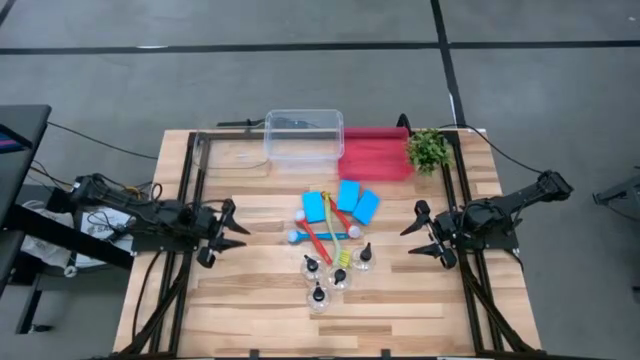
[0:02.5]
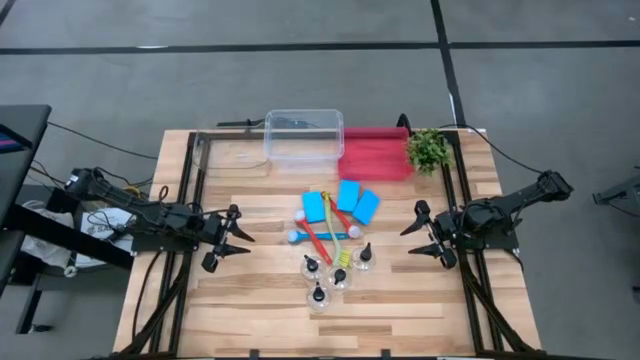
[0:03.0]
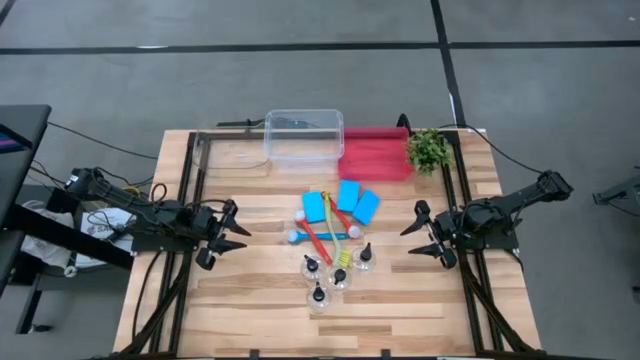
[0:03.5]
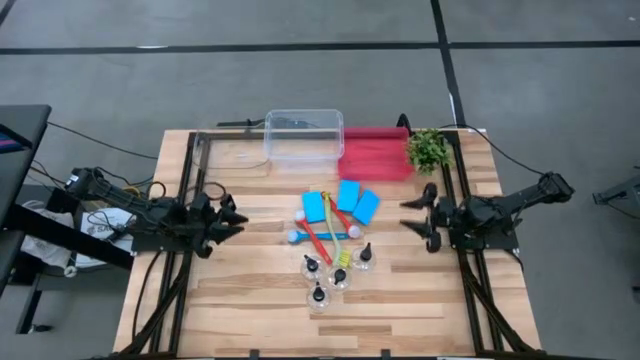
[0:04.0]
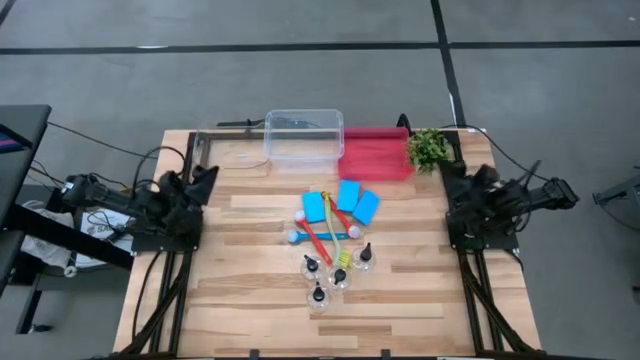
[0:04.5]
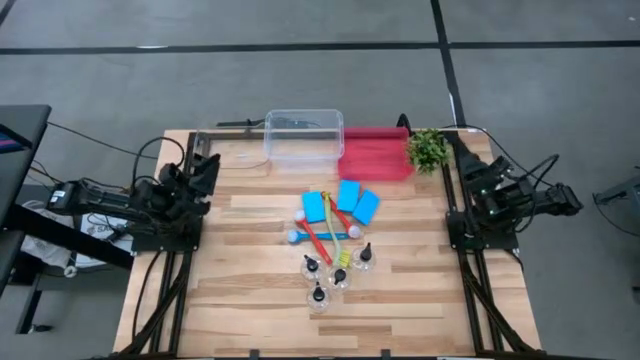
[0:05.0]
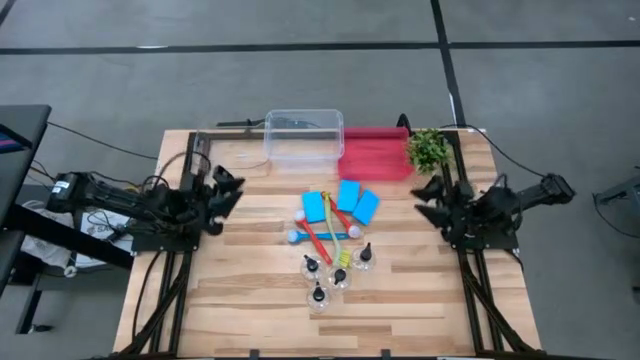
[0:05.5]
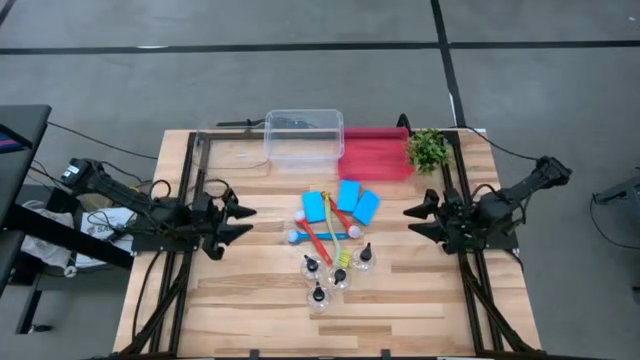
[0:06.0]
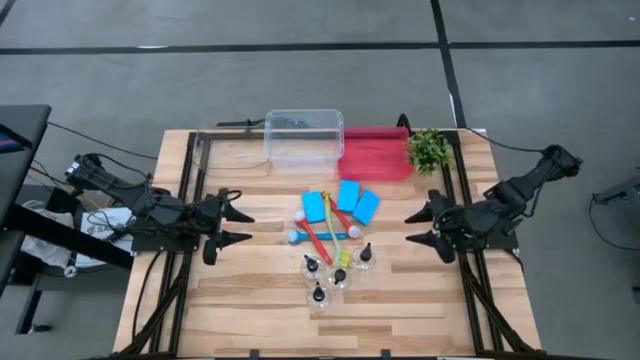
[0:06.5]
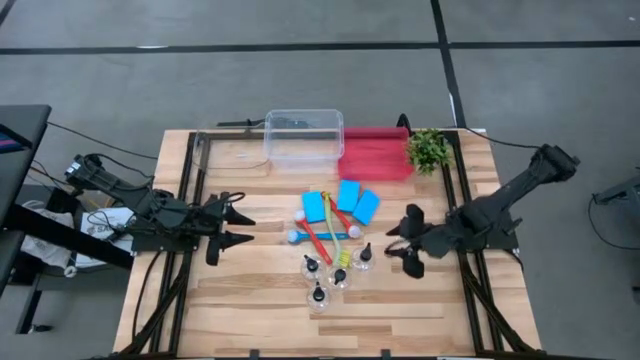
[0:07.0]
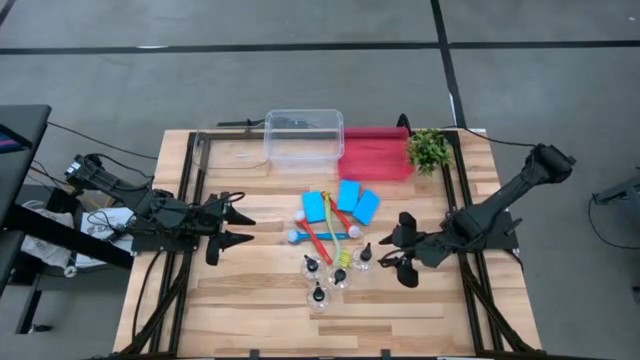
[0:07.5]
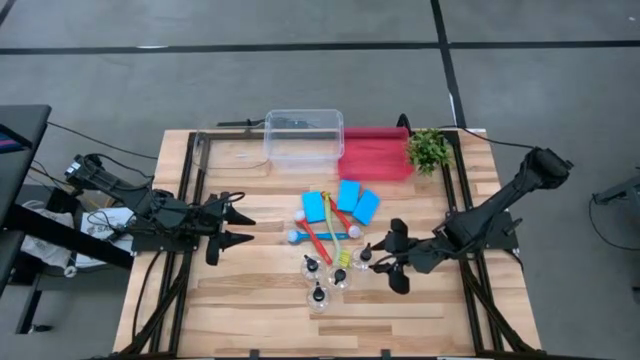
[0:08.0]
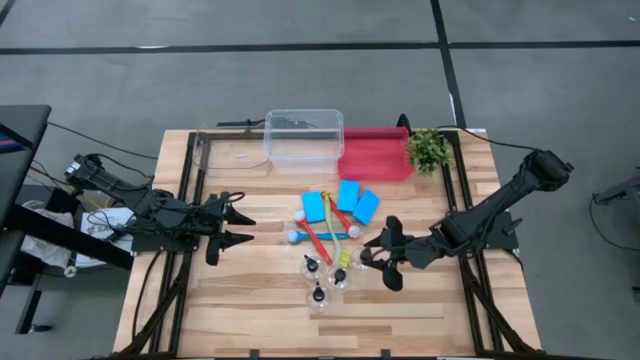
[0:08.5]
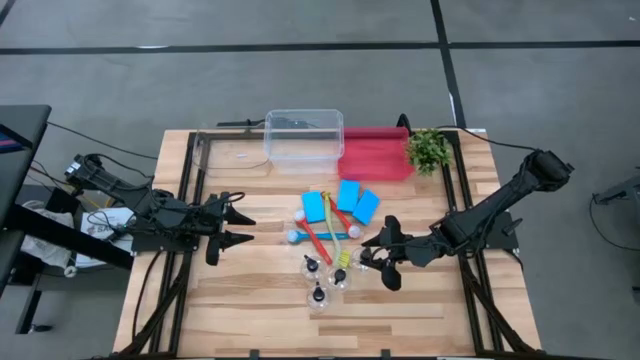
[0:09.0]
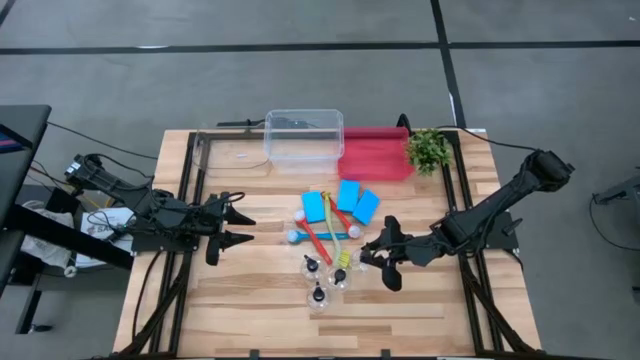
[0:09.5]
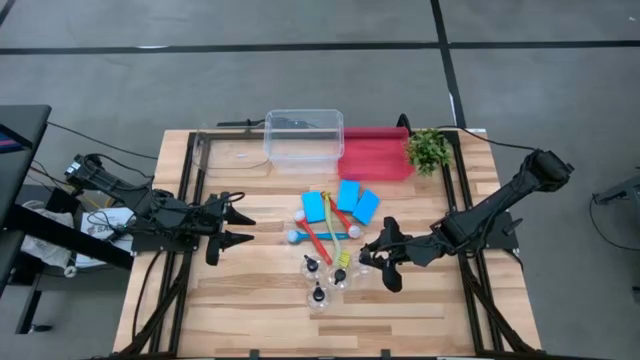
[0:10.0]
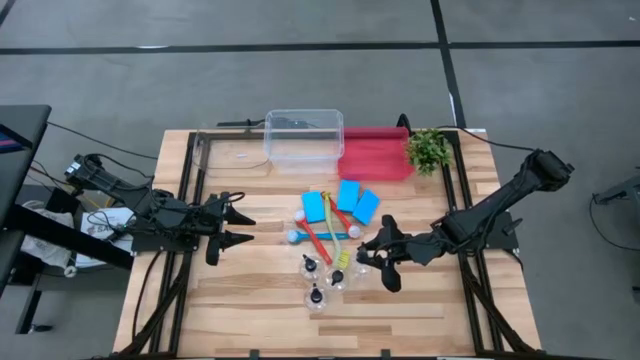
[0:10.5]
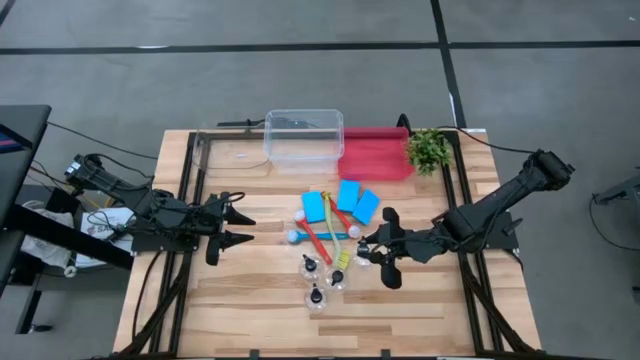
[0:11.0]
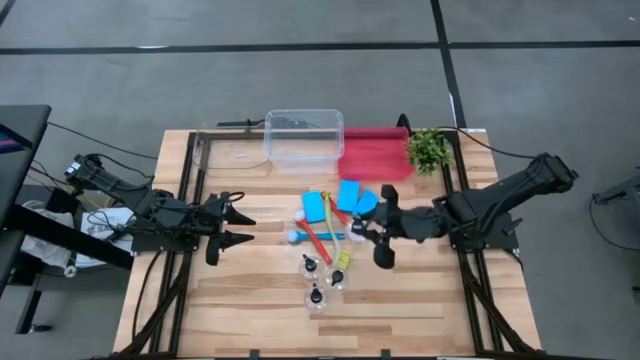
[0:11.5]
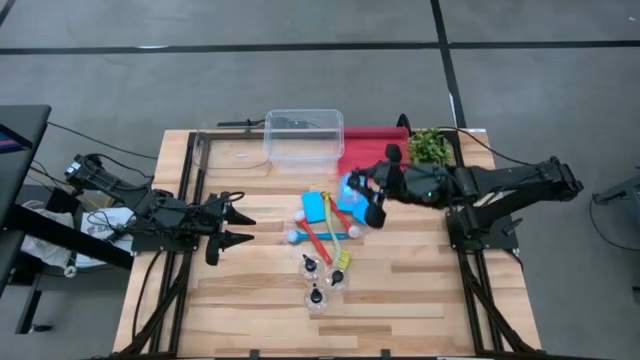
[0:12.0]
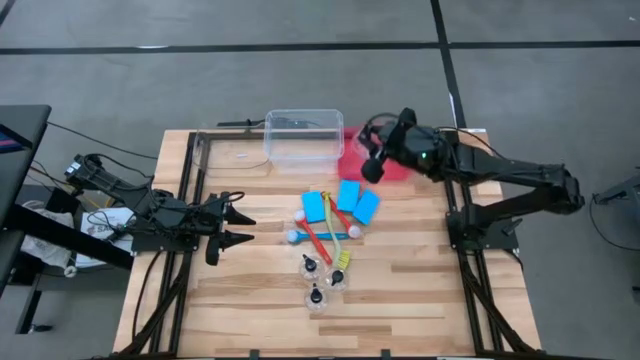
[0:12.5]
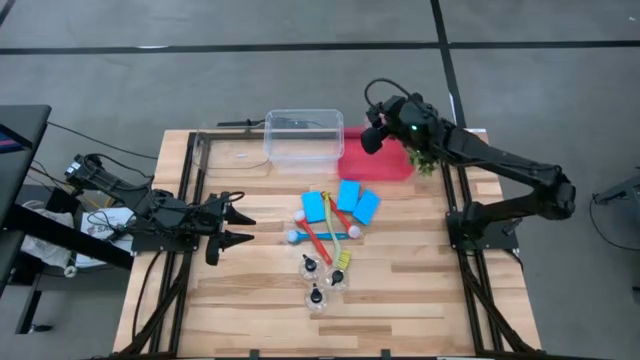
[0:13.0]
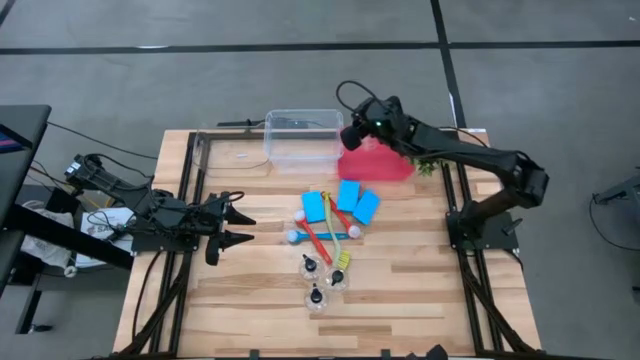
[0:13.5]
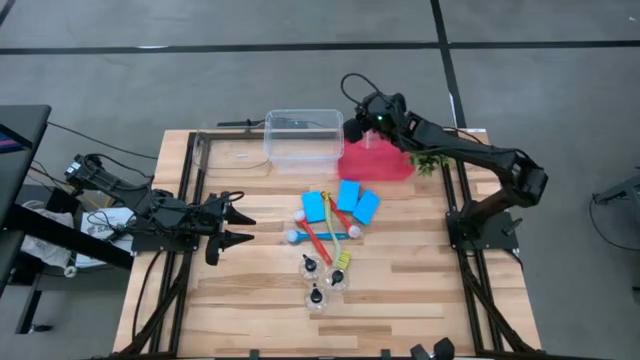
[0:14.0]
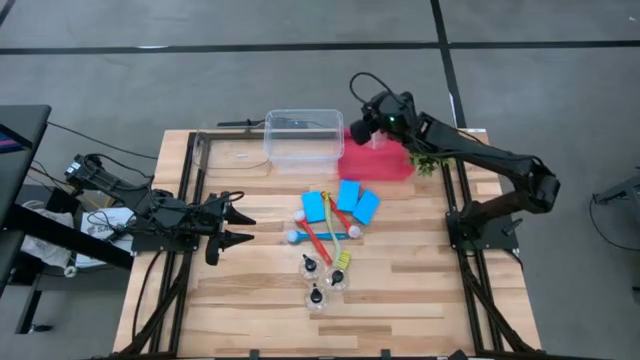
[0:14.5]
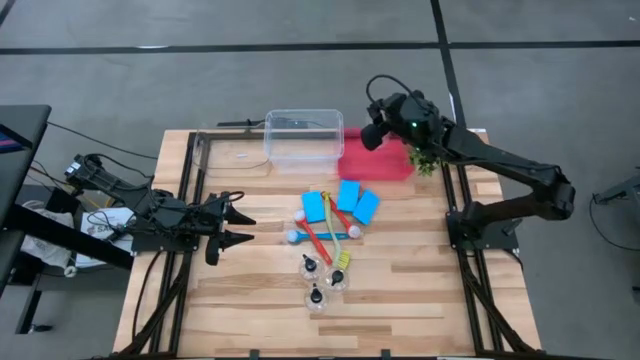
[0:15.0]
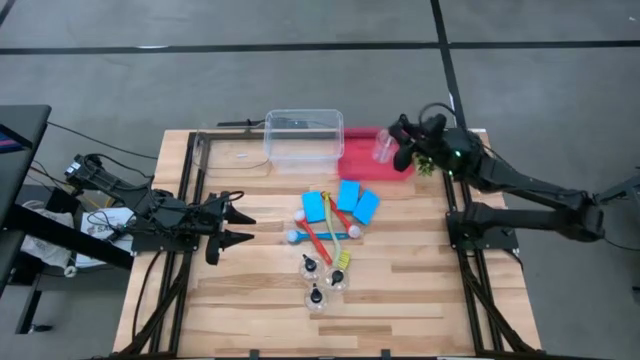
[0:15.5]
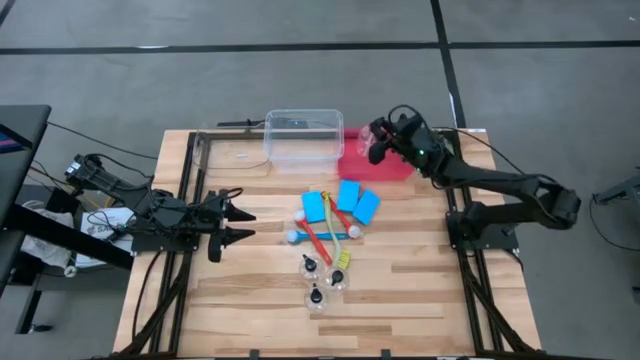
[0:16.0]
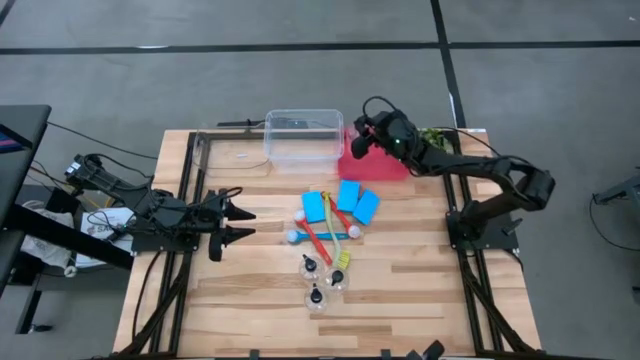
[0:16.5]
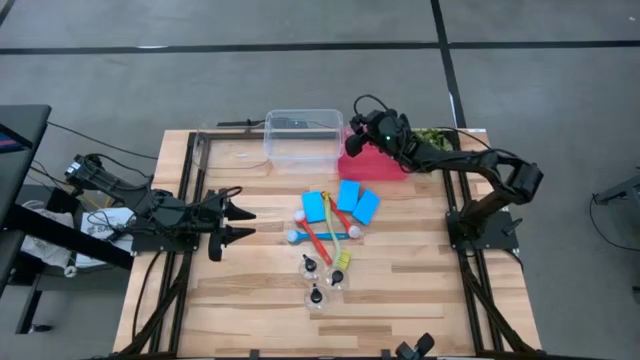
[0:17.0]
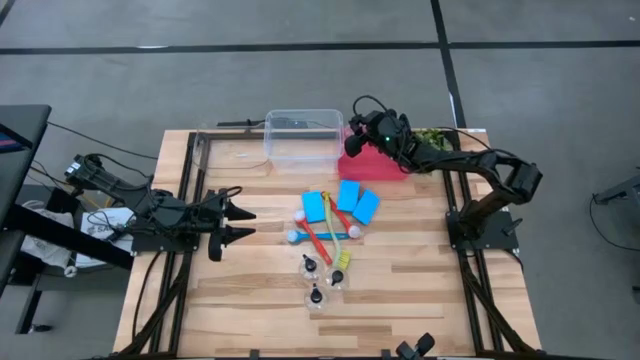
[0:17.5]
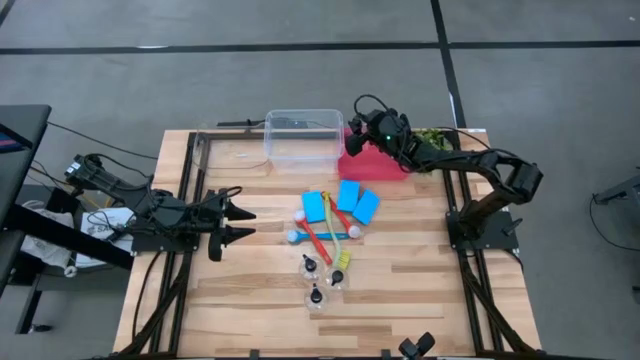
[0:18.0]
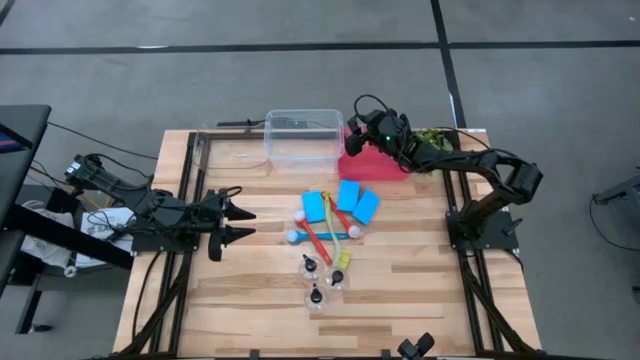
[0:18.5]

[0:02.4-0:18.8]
Task: Pick & Place Kitchen Sink Supplies
Put the transparent bottle into the red bin

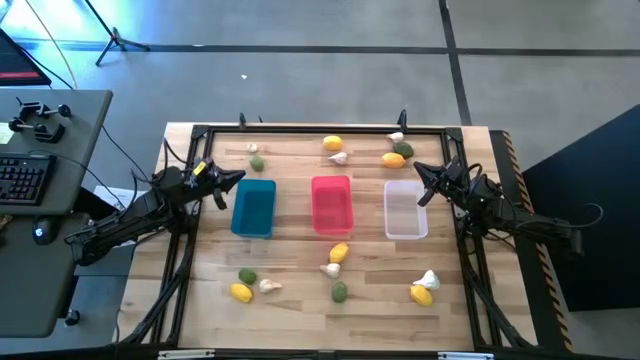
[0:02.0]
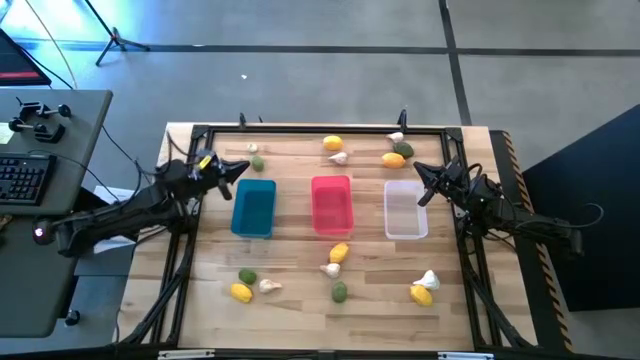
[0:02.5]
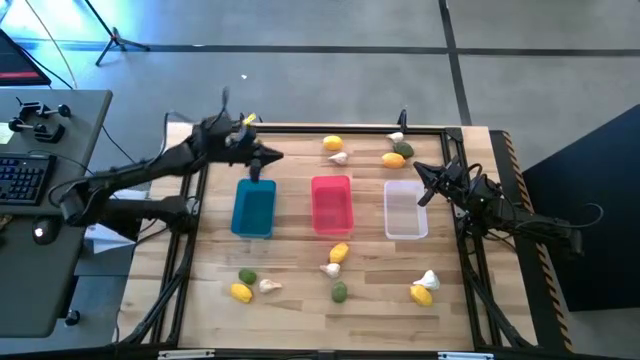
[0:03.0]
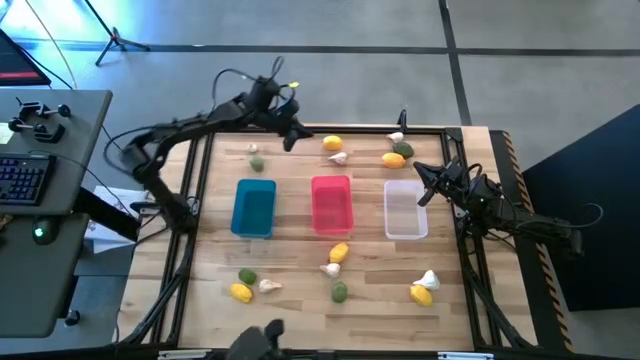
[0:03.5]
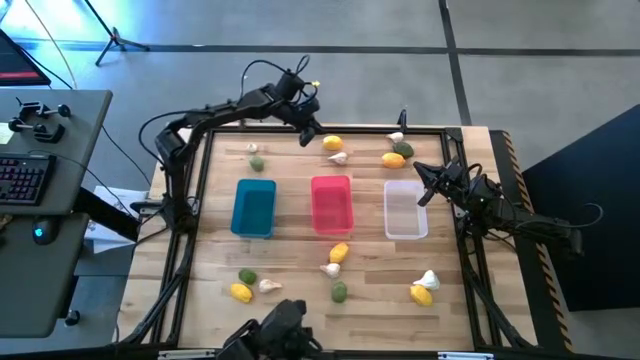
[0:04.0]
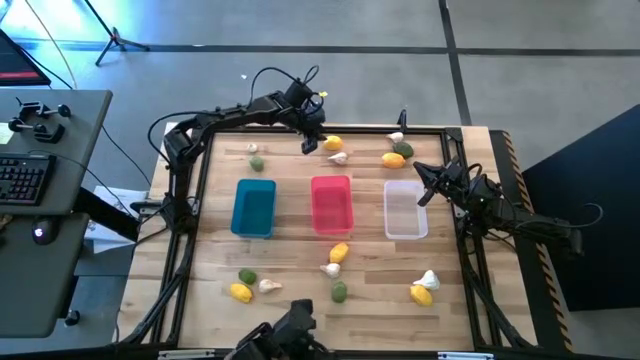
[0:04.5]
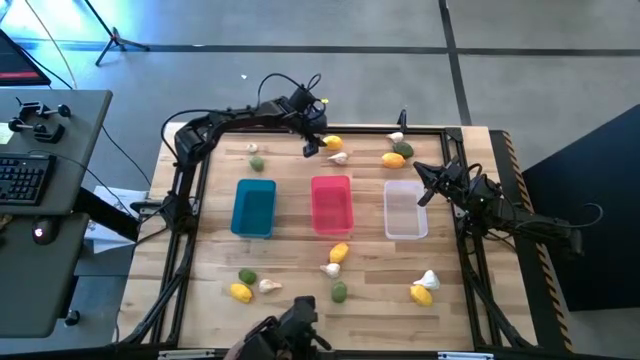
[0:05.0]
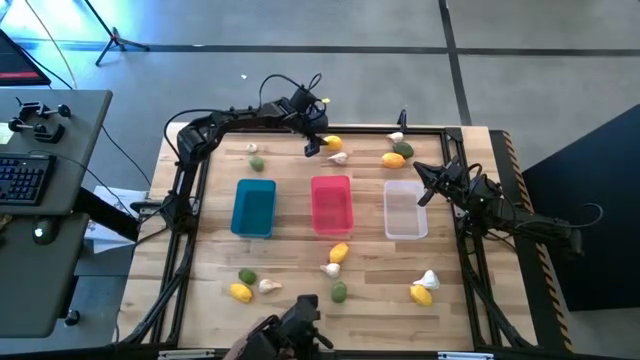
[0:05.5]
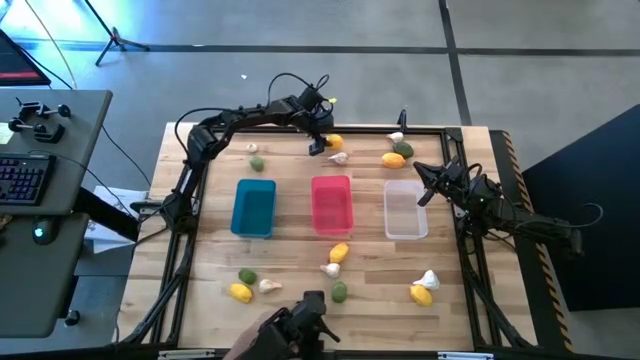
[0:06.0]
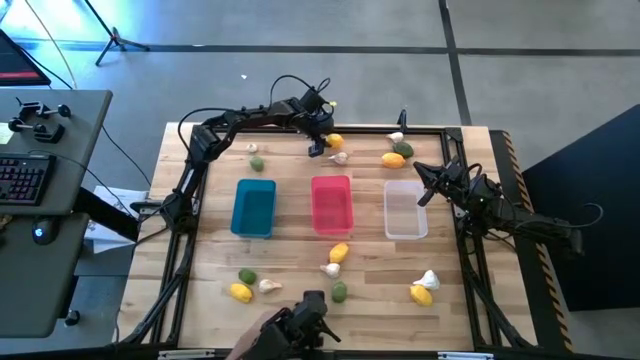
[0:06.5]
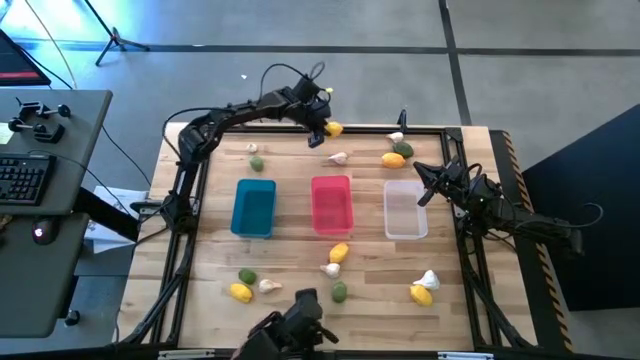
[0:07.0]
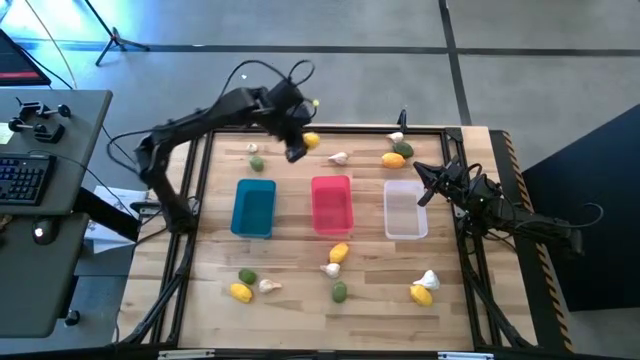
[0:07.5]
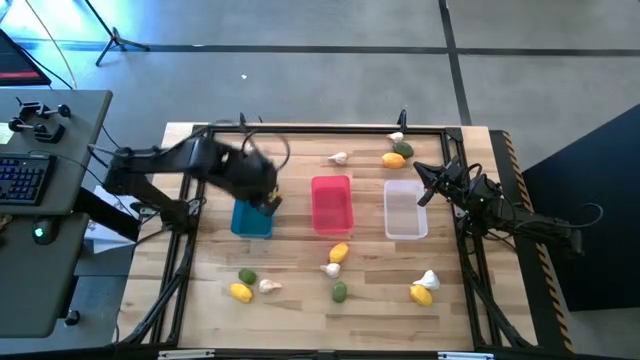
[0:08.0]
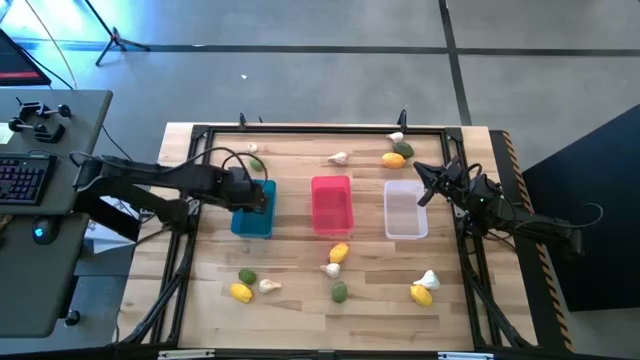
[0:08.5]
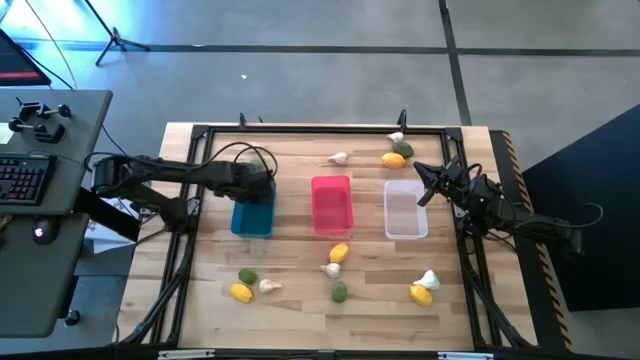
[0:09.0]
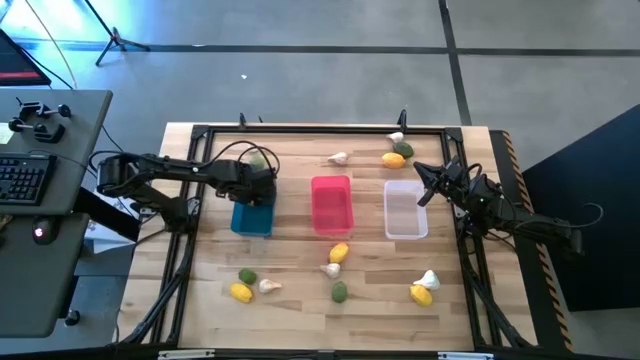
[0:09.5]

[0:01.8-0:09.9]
Task: Sort produce into baskets
Put the top left yellow lemon into the blue bin
